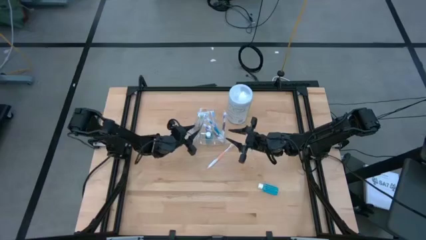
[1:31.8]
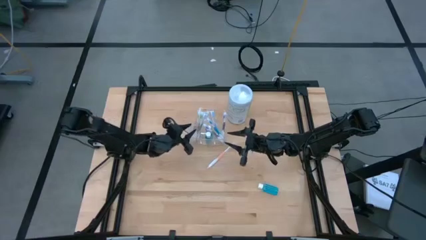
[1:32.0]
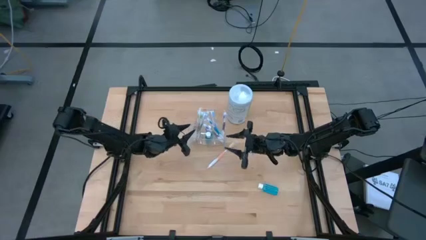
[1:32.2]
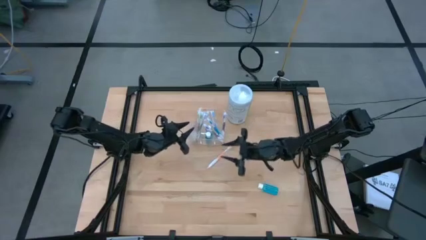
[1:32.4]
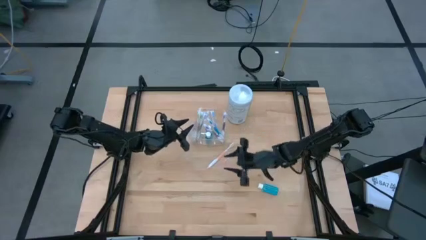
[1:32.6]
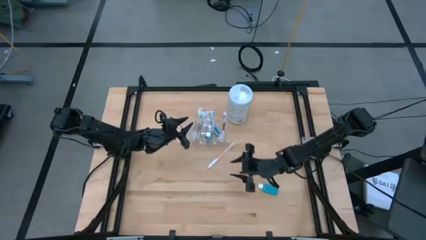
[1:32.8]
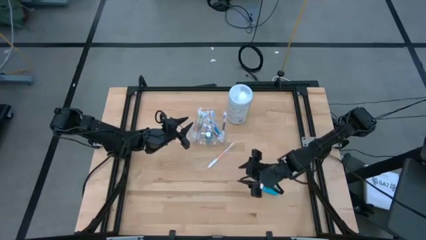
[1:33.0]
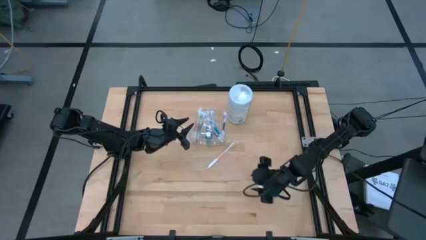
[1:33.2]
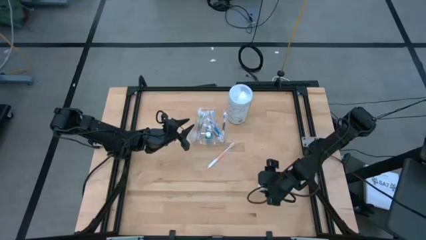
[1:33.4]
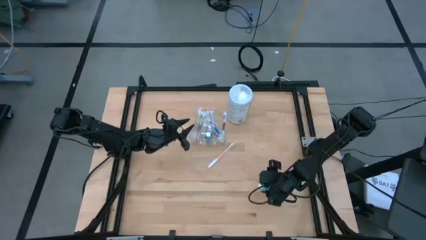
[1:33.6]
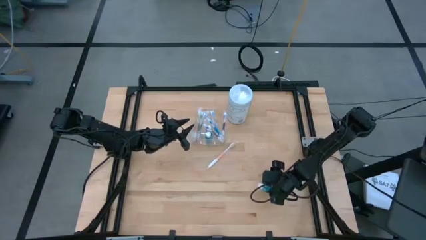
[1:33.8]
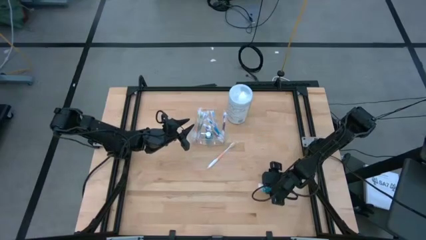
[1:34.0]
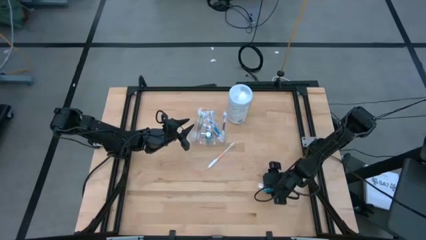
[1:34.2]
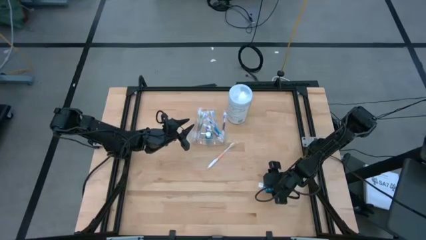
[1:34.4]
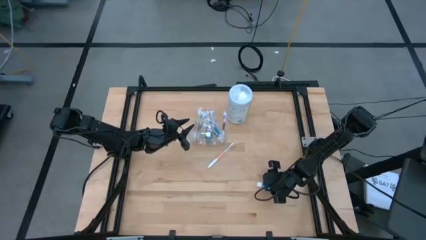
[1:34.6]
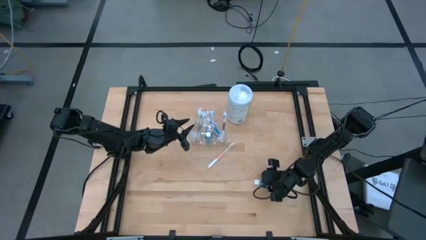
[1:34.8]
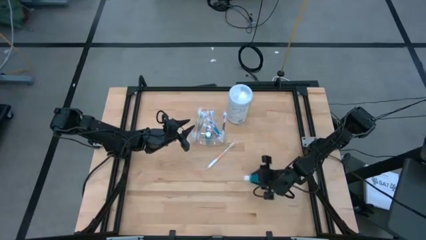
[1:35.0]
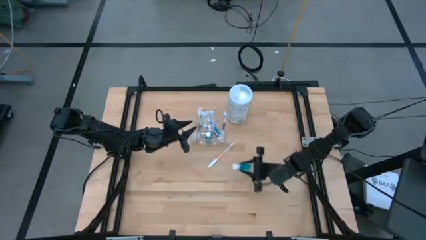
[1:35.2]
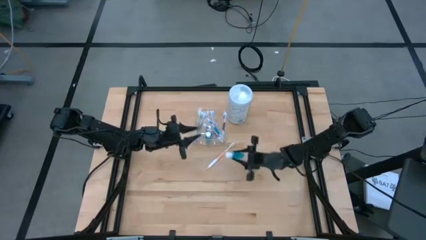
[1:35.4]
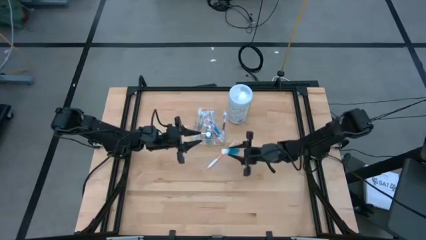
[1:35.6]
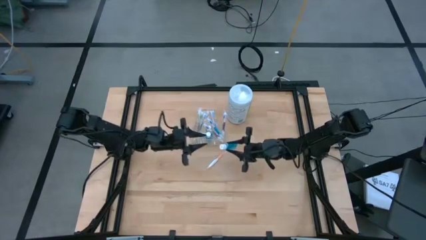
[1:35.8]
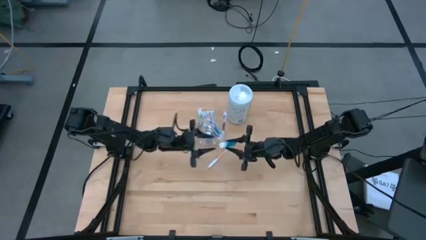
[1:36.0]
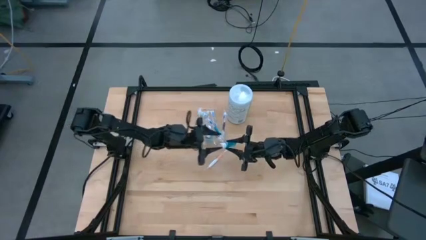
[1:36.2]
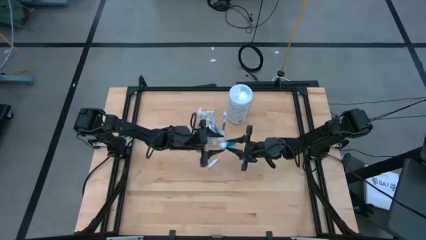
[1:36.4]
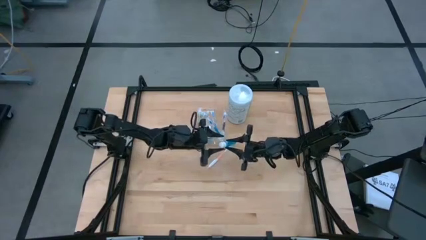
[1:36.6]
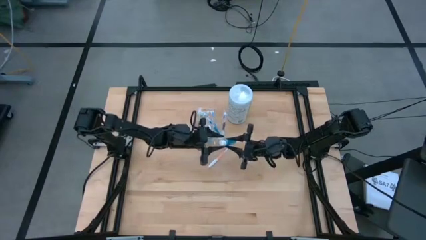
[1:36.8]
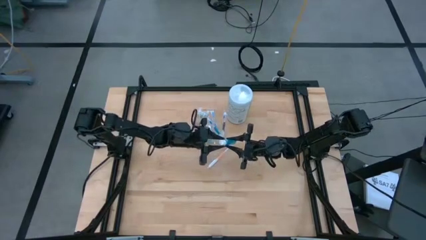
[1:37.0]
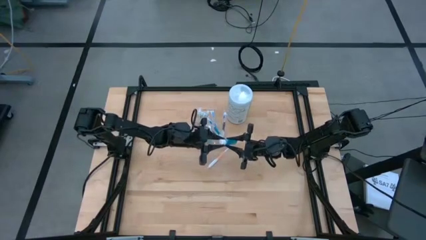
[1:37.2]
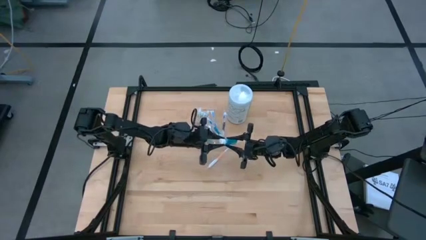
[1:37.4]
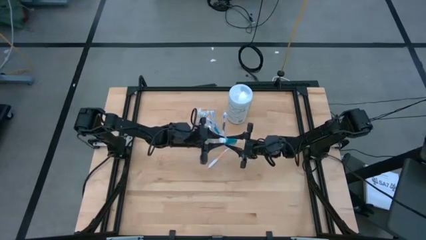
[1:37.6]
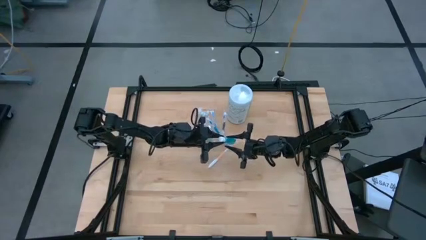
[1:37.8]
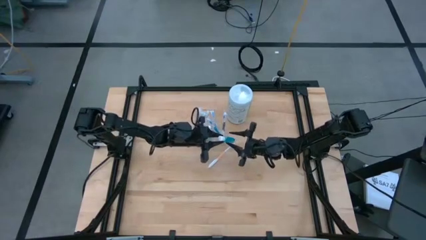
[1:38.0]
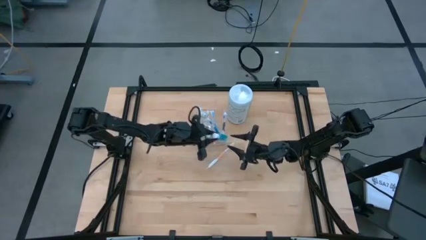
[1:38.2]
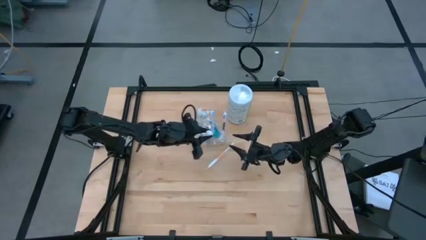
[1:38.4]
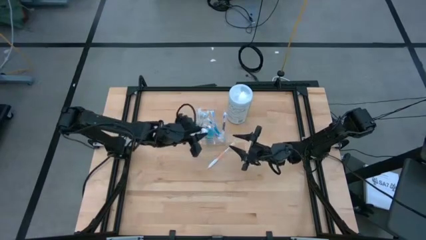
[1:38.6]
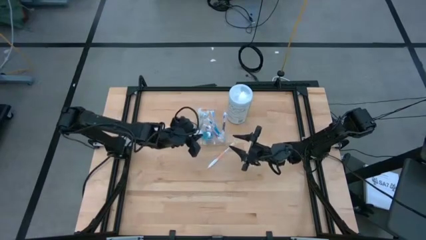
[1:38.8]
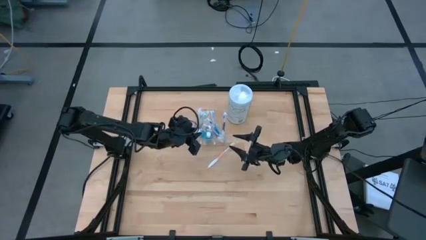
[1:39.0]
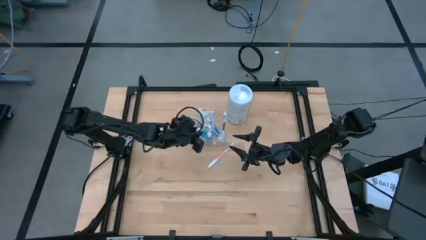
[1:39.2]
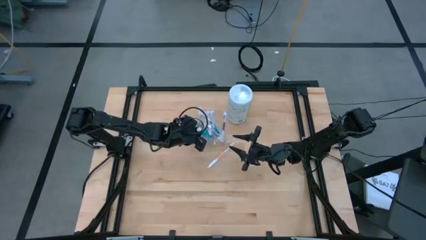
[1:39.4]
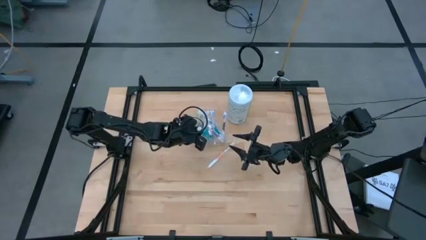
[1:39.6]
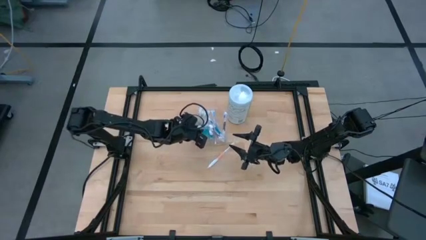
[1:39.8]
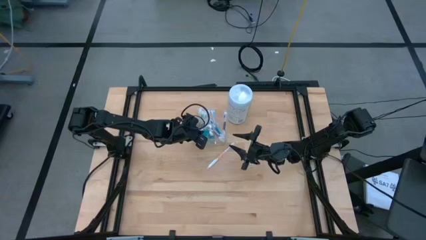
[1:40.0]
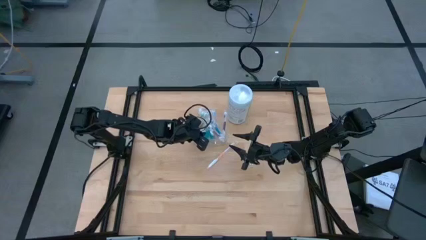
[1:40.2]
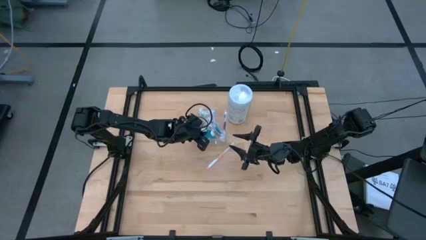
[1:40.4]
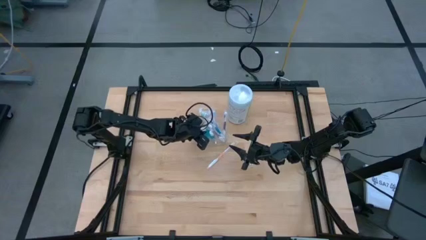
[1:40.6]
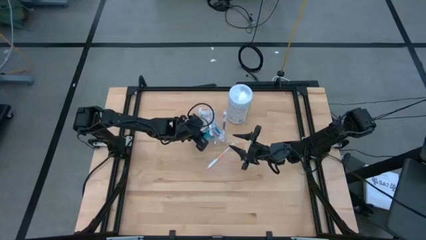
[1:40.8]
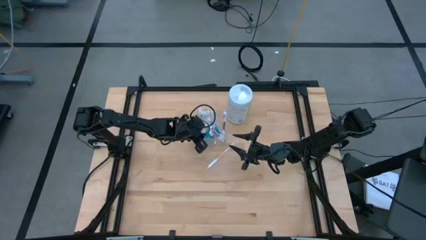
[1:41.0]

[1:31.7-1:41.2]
Task: Pick & Place toothbrushing station
Put the mouthwash into the transparent organizer

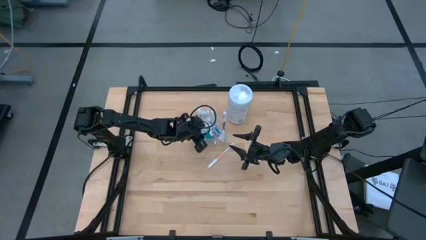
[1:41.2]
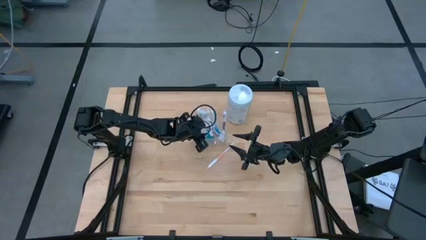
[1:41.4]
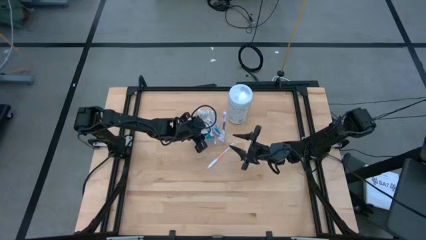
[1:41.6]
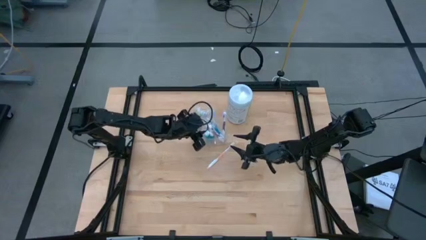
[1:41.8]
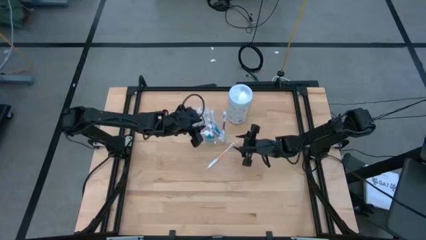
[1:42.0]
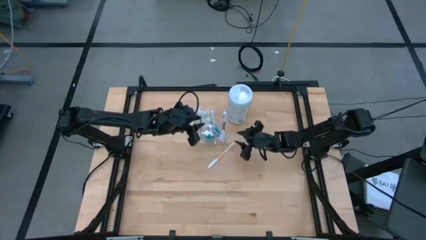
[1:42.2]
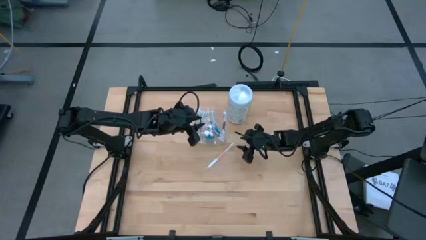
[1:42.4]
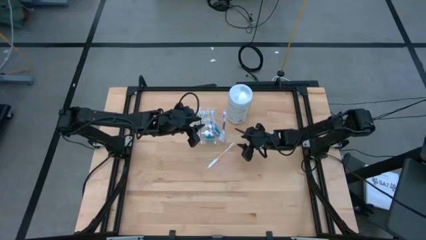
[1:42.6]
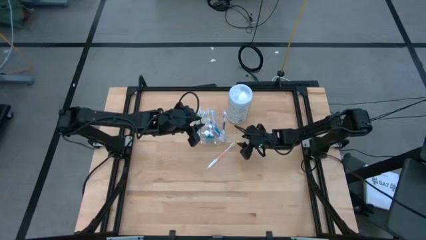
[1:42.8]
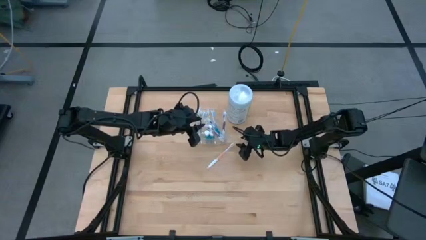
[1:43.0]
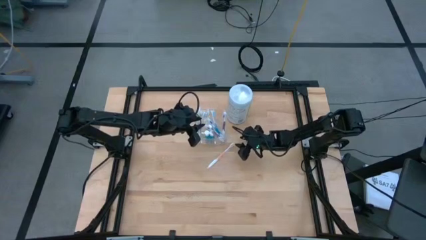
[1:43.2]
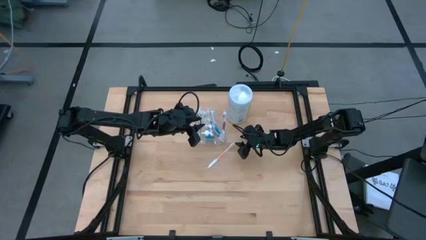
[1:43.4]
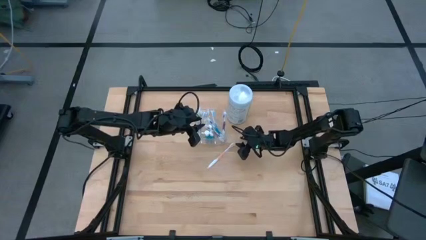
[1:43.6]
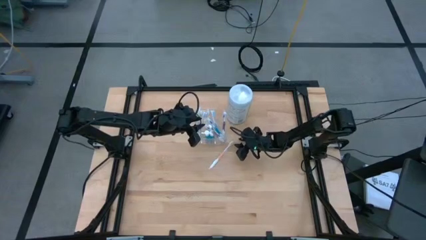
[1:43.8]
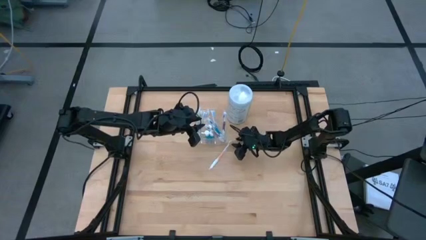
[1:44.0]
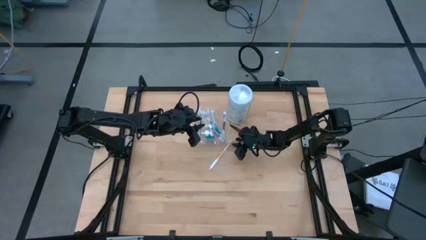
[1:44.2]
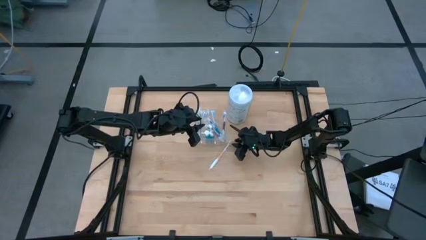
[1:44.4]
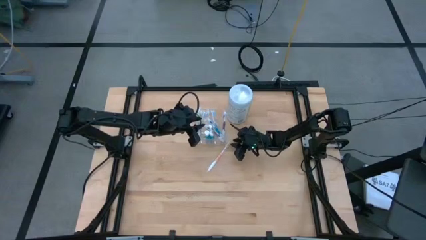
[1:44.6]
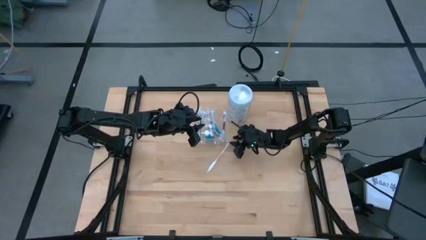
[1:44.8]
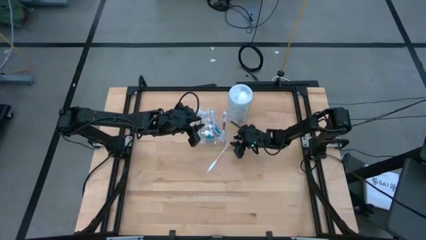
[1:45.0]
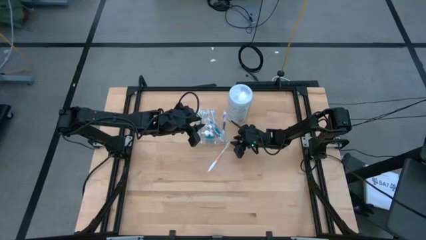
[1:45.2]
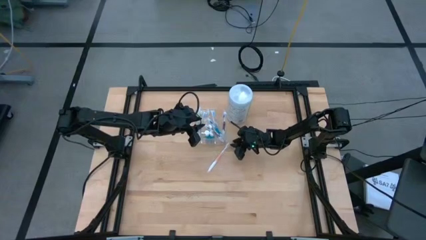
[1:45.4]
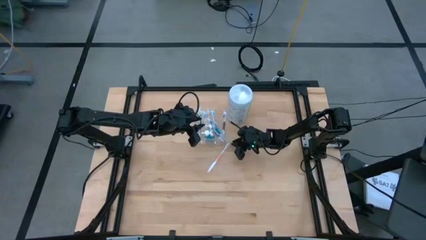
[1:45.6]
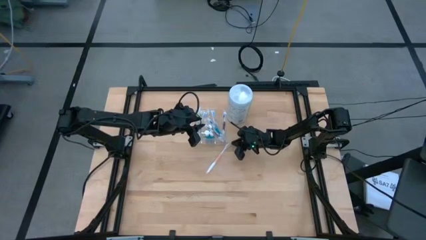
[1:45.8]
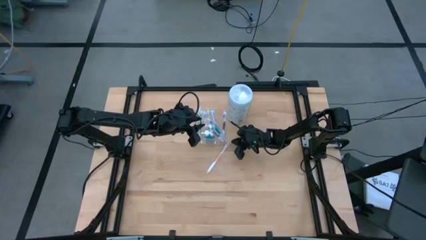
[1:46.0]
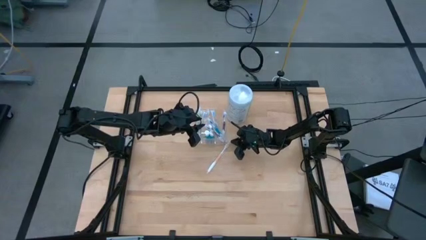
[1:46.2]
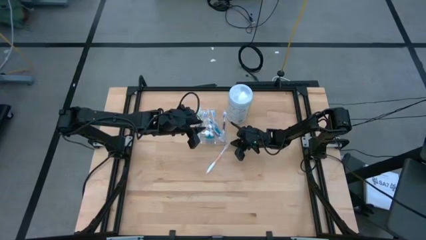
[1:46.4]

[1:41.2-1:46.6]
Put the orange toothbrush into the transparent organizer

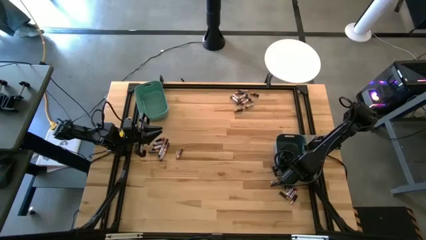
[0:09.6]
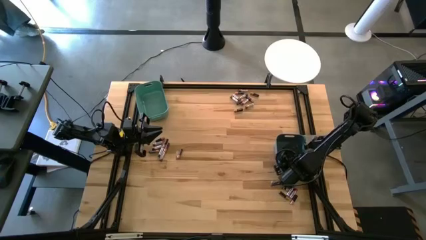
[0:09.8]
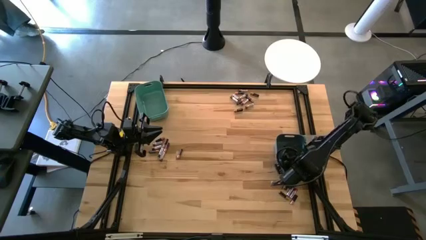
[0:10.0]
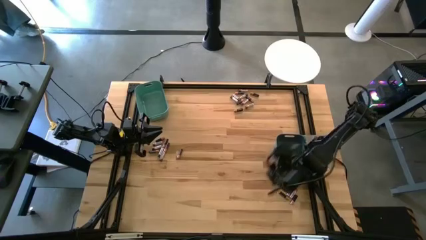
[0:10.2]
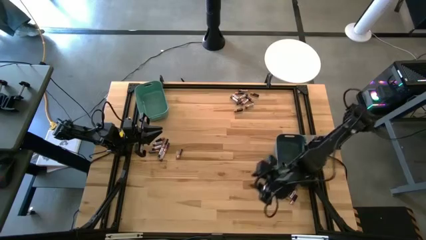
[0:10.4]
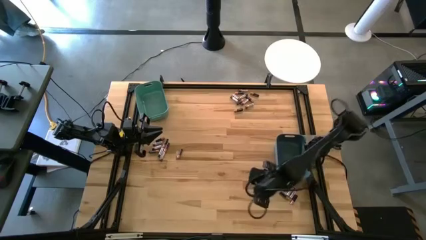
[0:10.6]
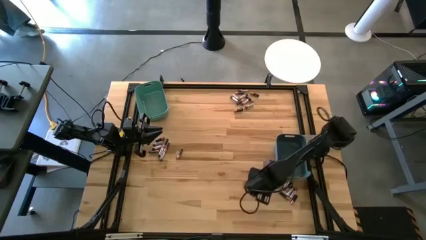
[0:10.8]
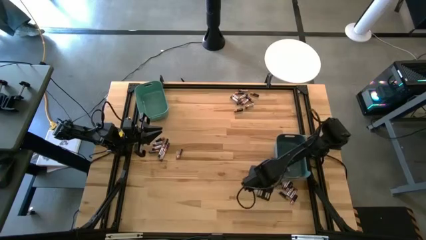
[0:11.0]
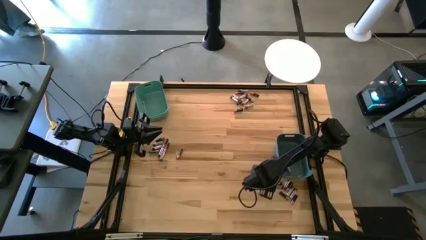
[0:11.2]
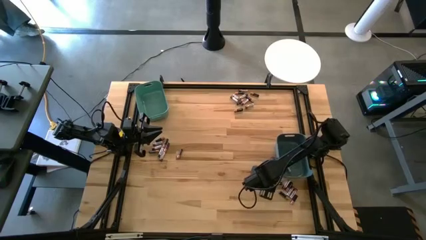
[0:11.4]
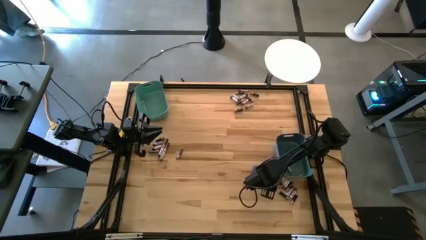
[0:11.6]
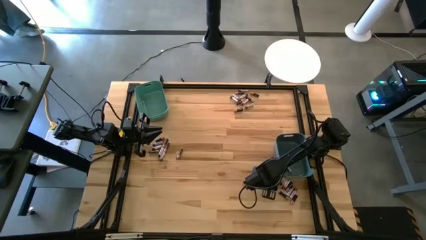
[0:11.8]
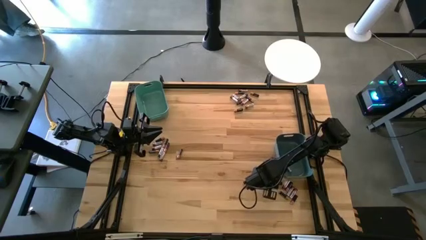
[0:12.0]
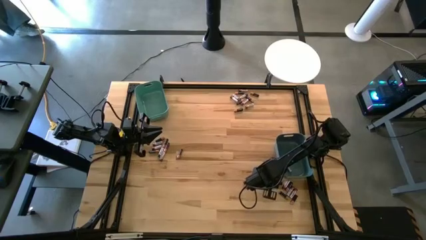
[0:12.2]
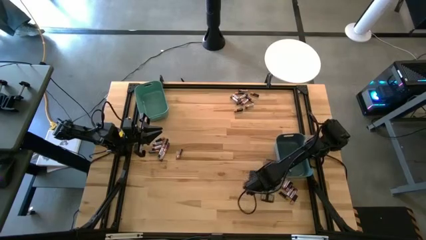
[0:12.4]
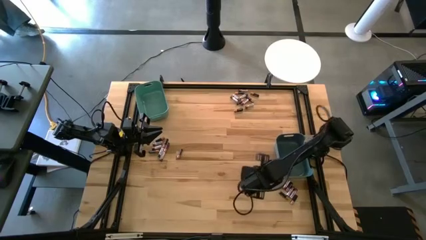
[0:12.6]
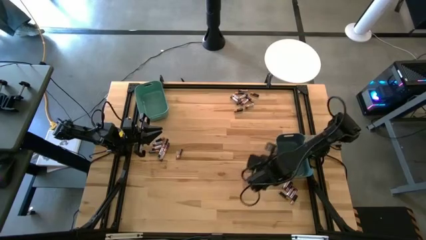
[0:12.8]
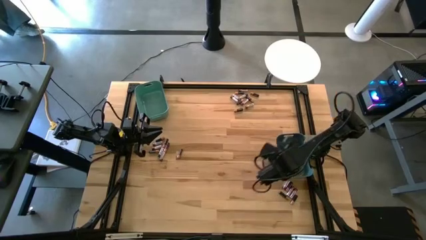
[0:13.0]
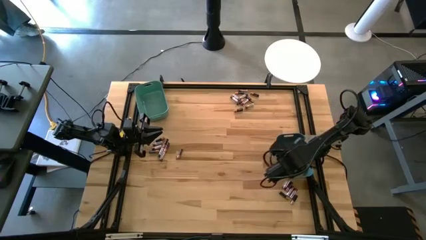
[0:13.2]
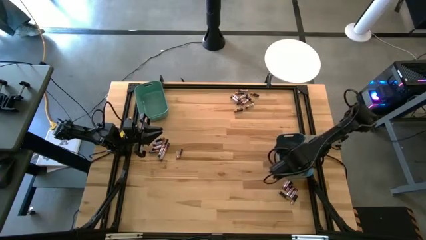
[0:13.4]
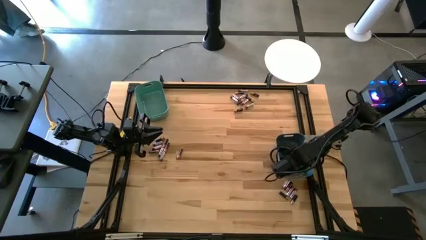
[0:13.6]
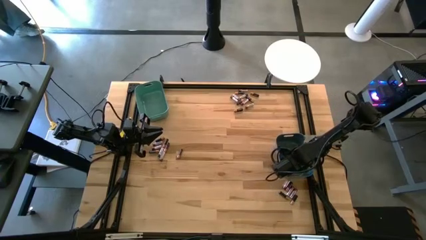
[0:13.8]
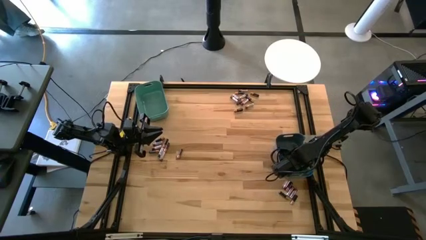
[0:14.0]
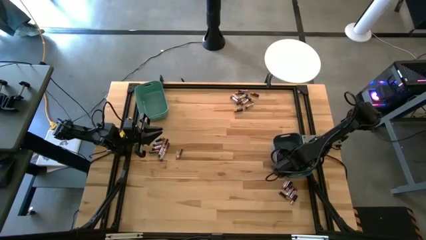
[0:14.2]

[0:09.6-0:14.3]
Task: Sort batteries
Put the silver battery into the blue bin
